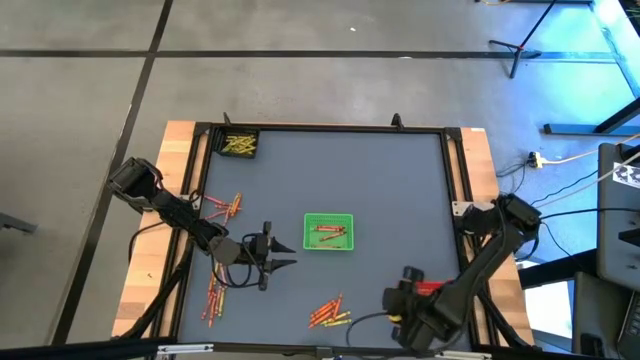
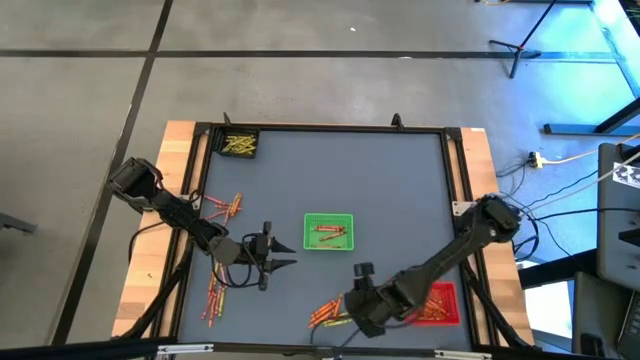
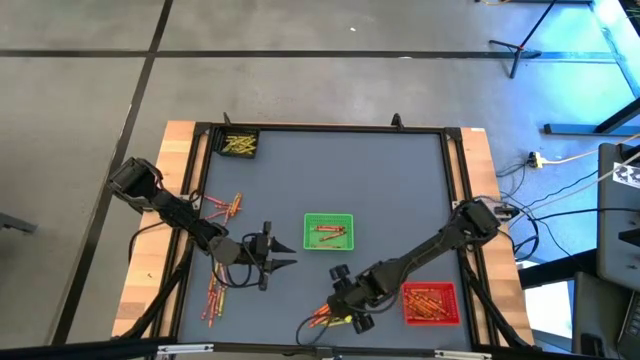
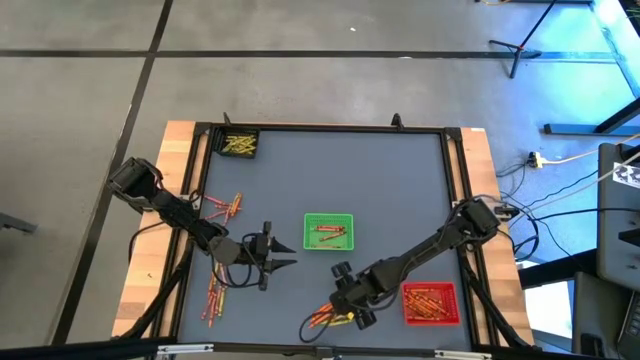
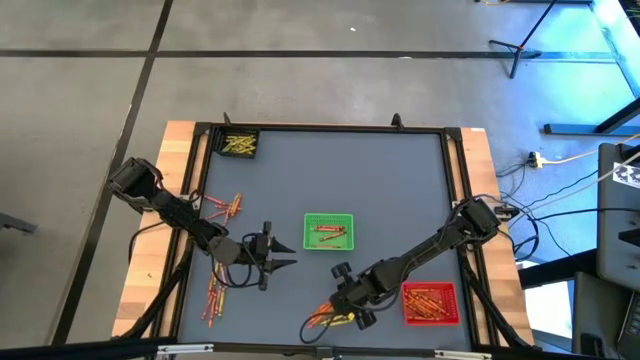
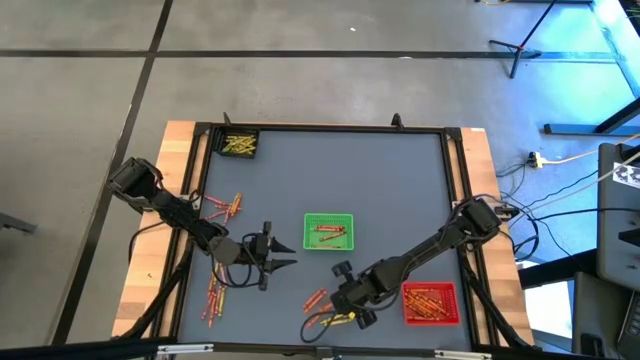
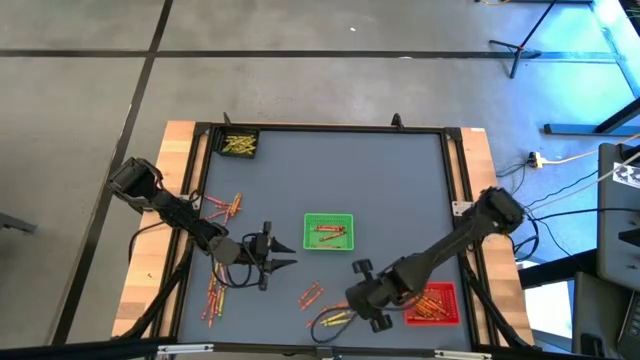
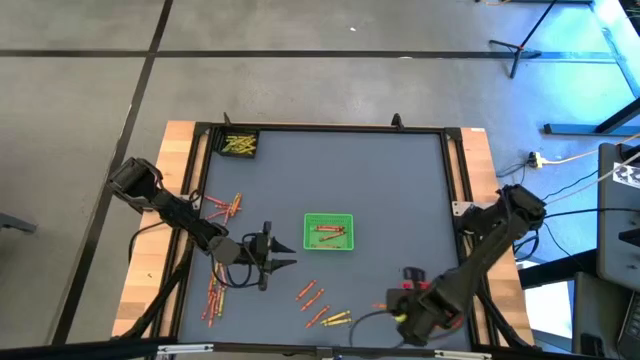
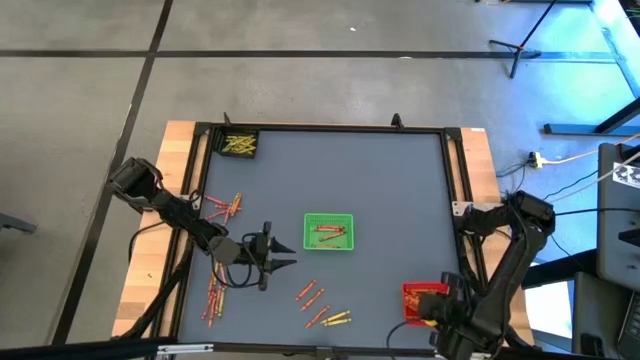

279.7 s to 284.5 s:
Task: Sort crayons
Put the orange crayon into the red bin

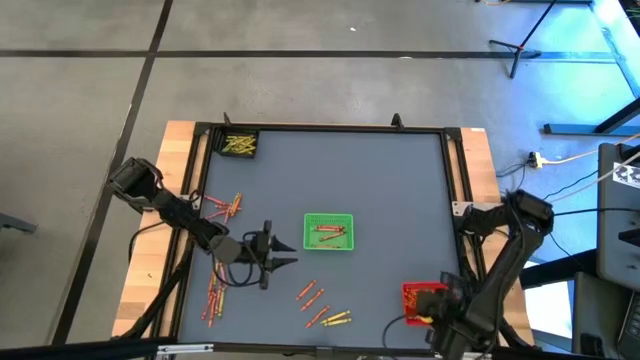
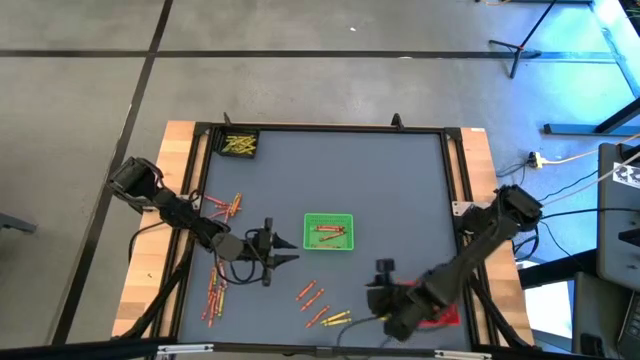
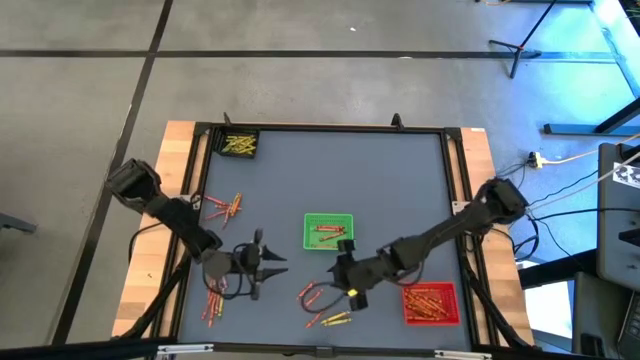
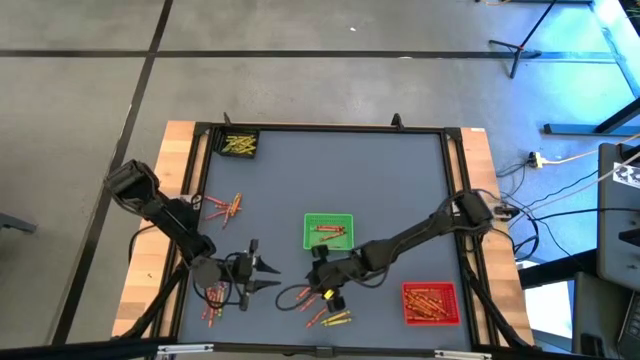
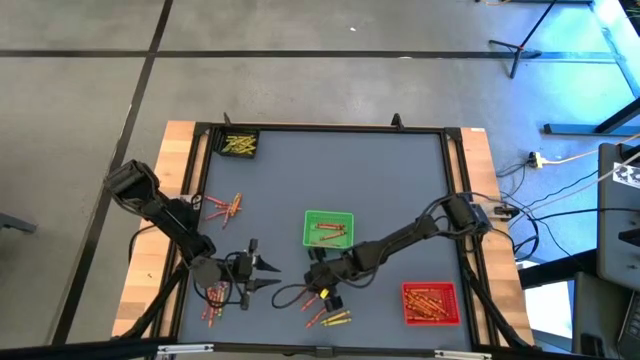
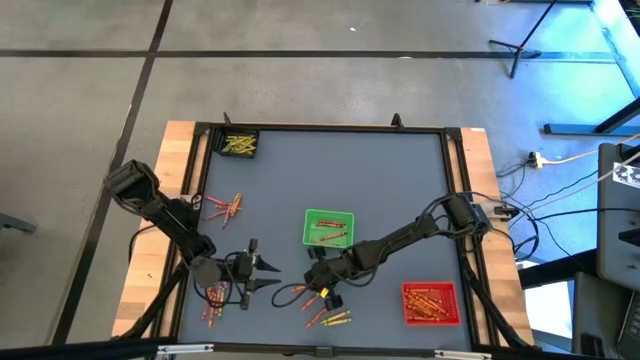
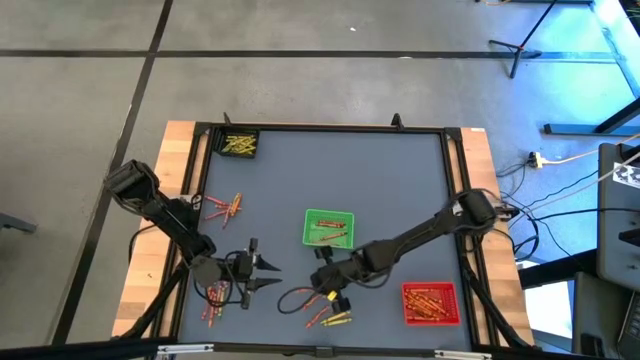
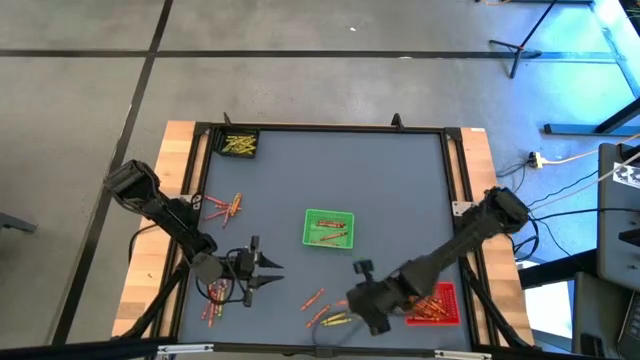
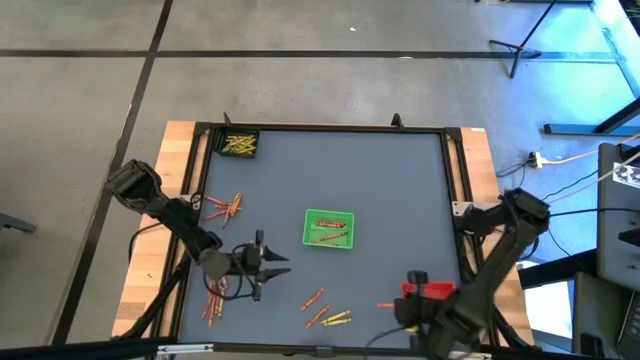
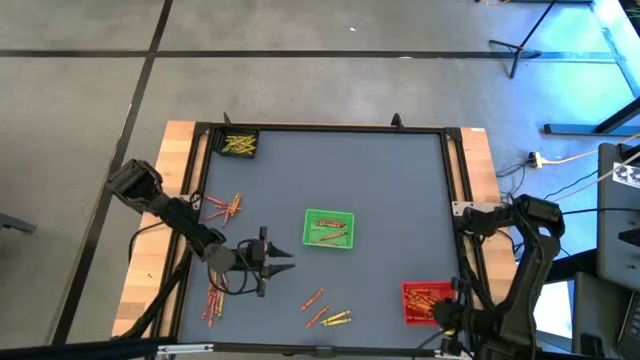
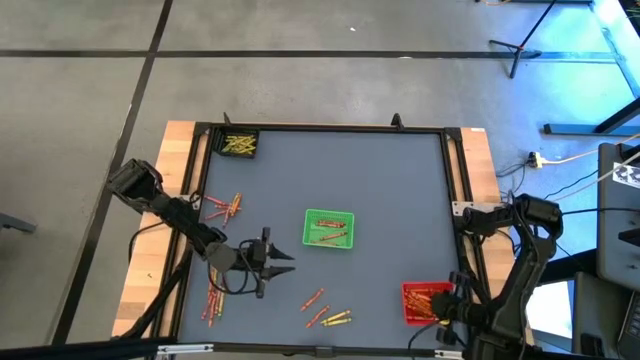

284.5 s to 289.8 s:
Put the orange crayon into the red bin

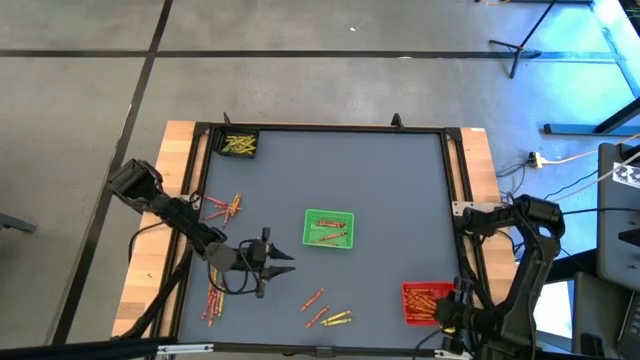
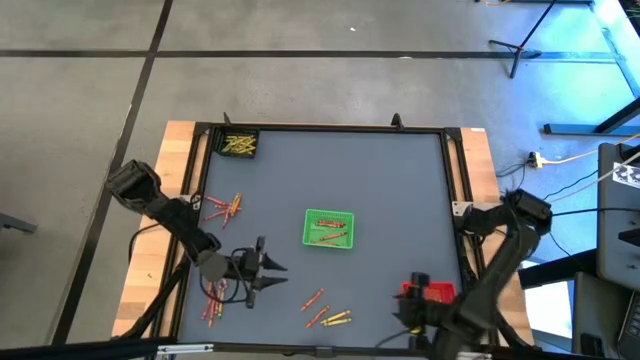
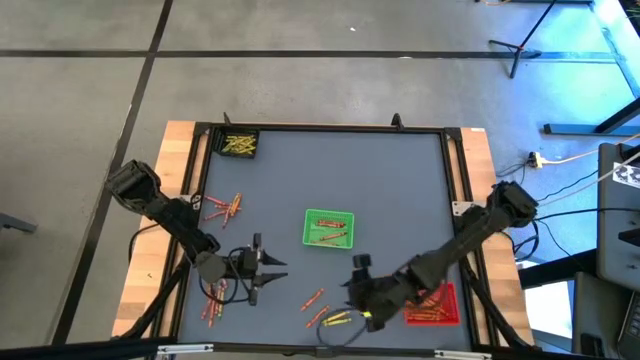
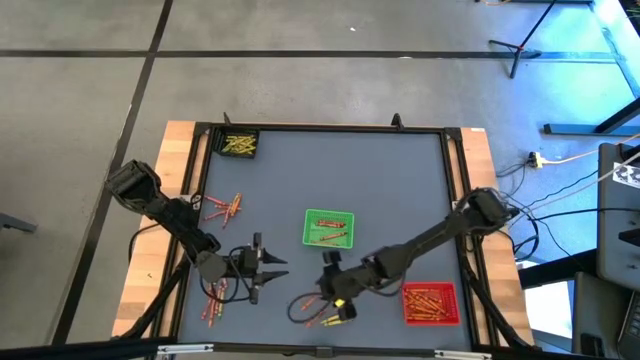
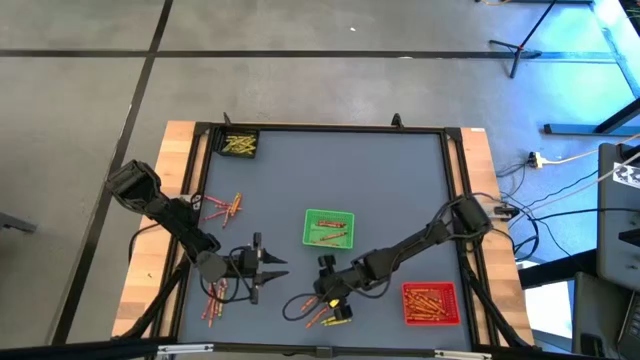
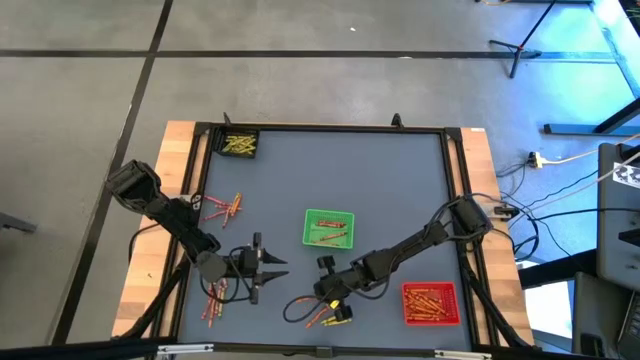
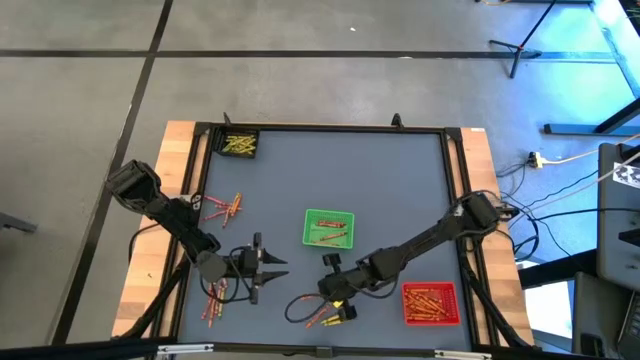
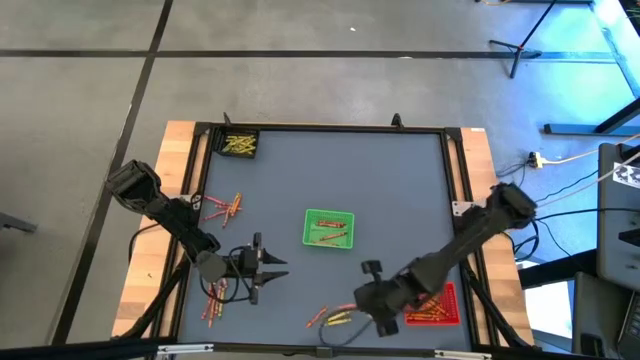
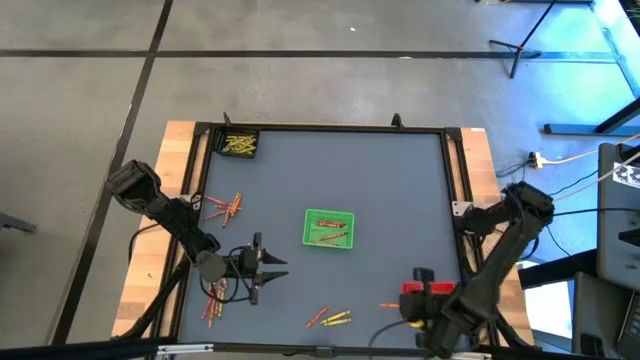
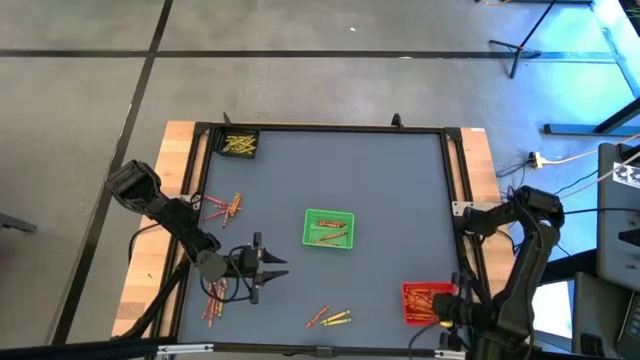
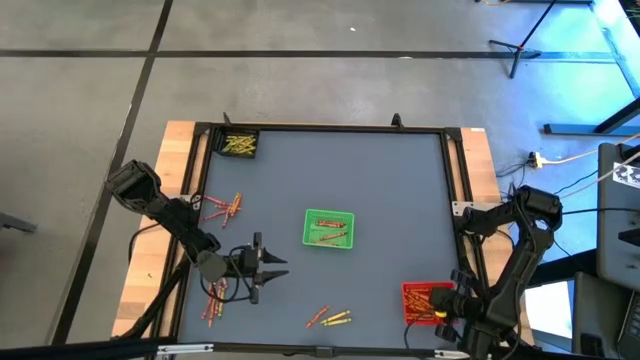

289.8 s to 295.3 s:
Put the orange crayon into the red bin

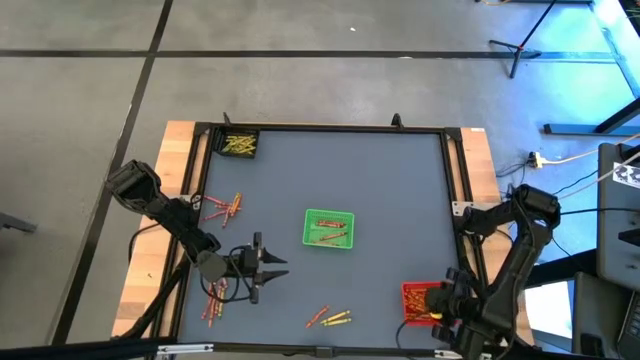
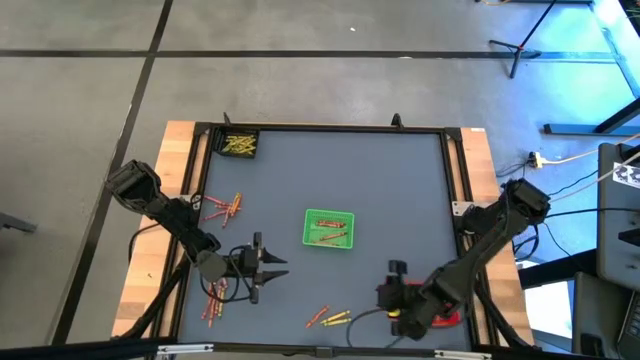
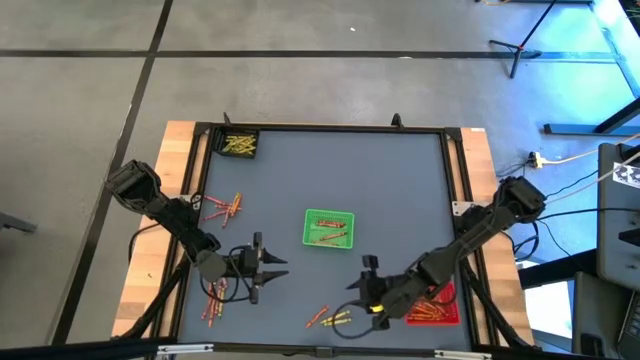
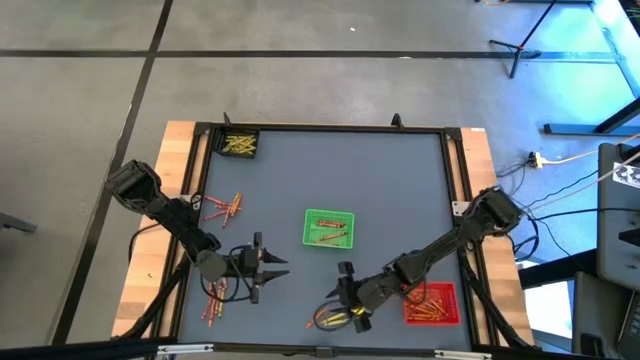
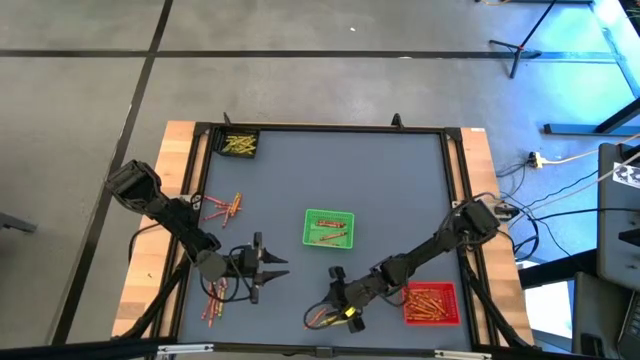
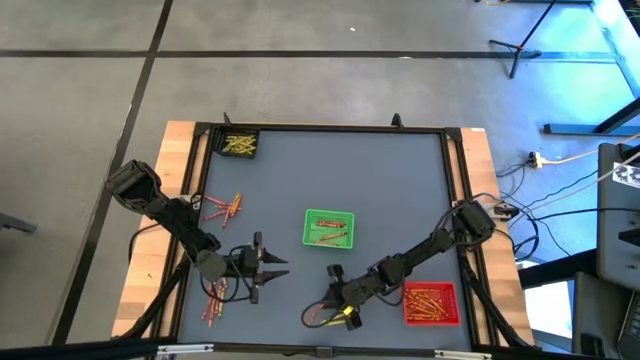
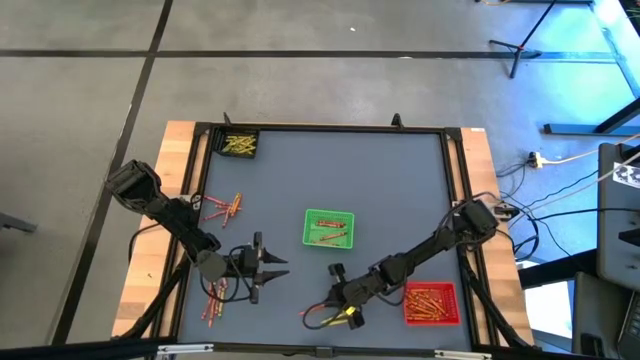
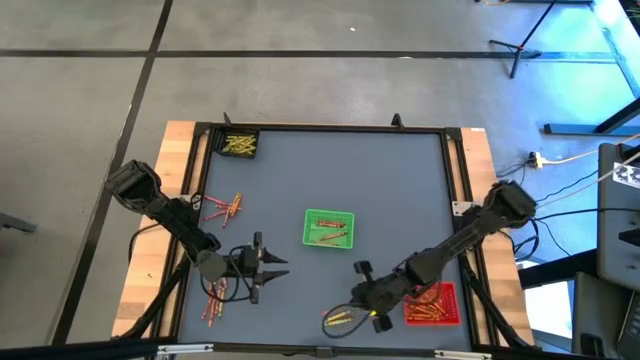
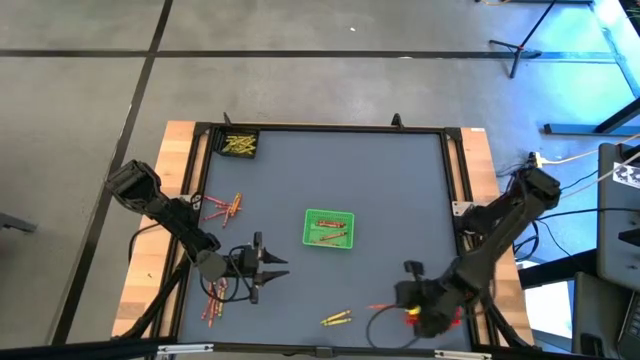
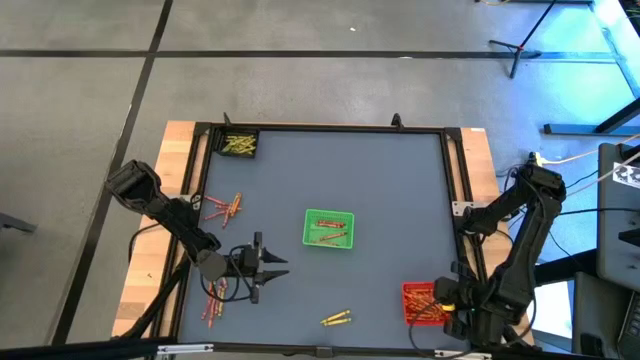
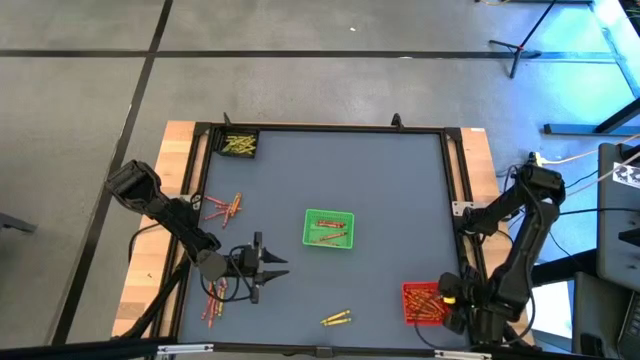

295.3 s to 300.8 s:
Put the orange crayon into the red bin

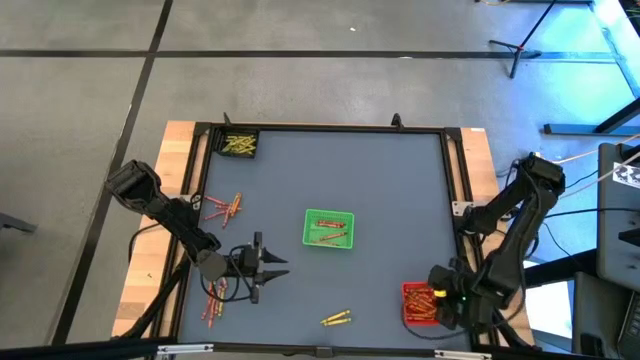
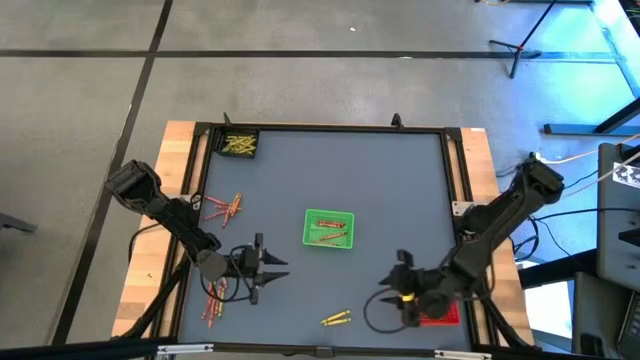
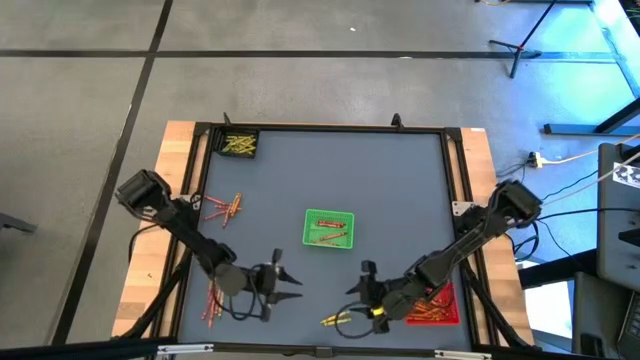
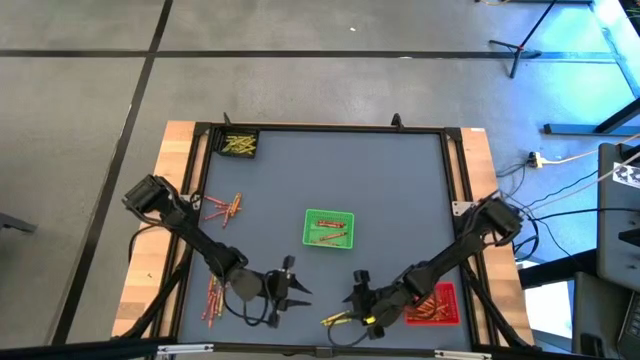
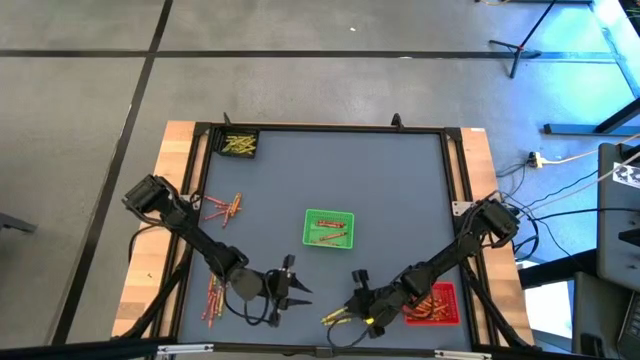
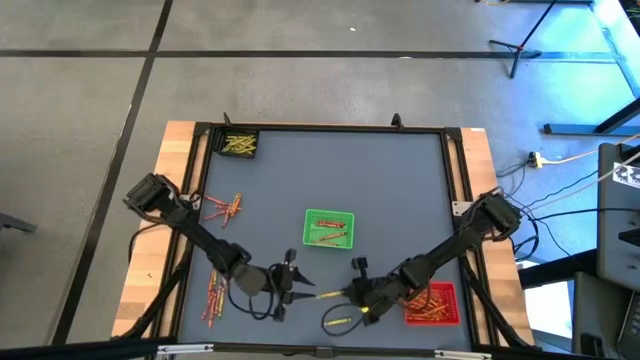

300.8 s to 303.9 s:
Put the light green crayon into the black bin
